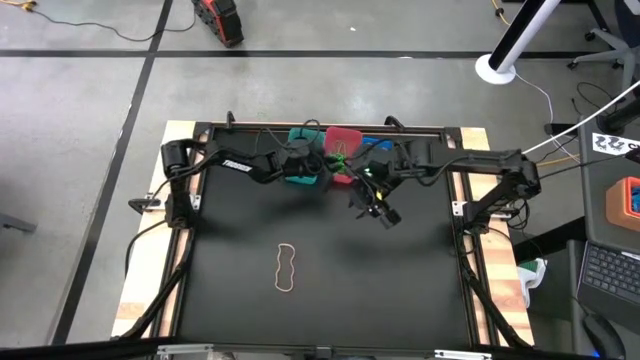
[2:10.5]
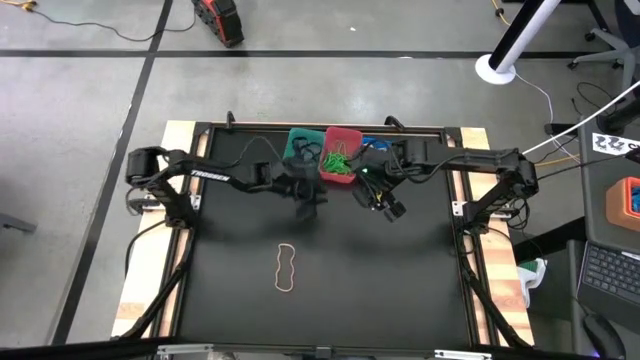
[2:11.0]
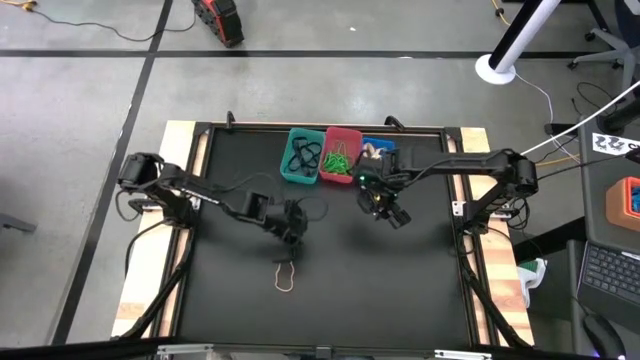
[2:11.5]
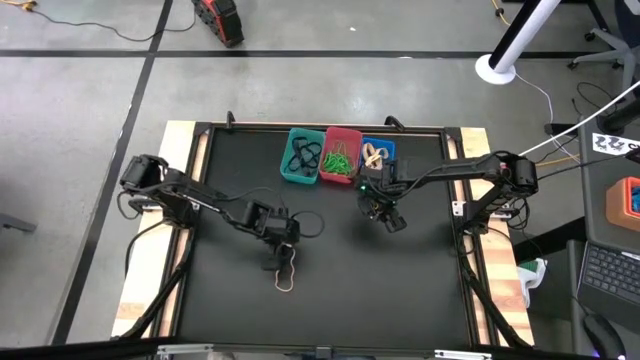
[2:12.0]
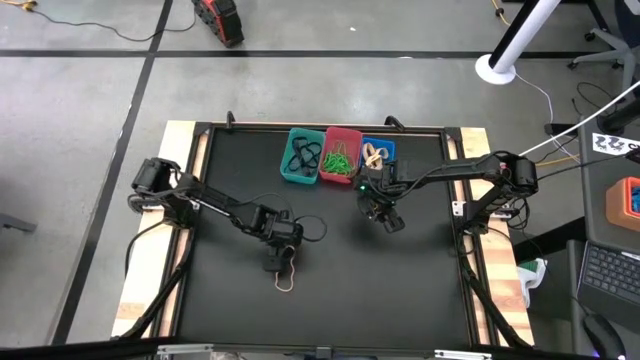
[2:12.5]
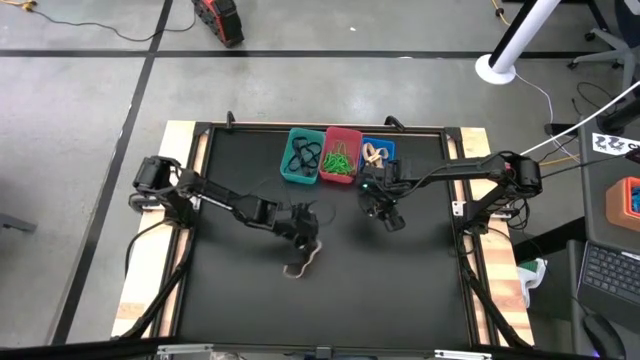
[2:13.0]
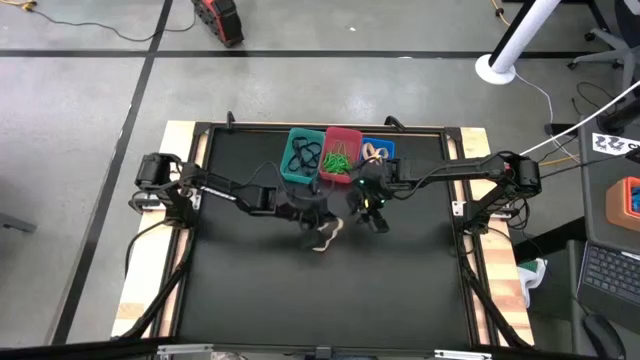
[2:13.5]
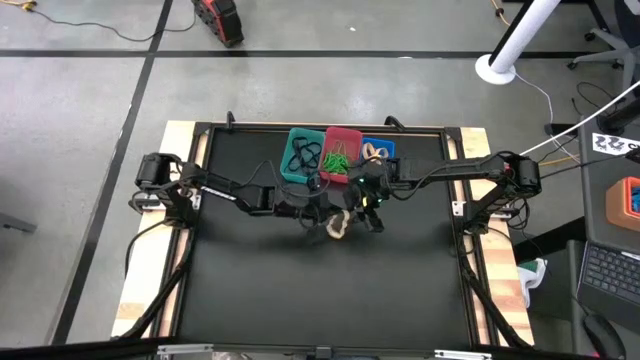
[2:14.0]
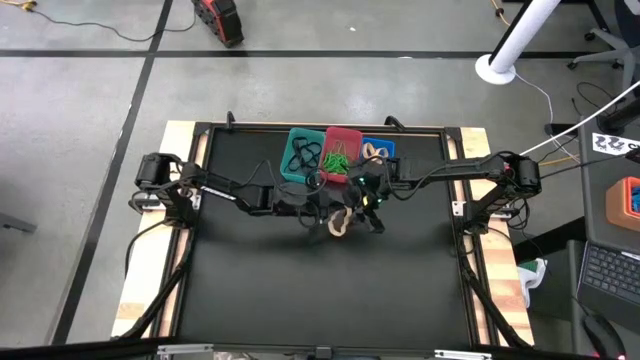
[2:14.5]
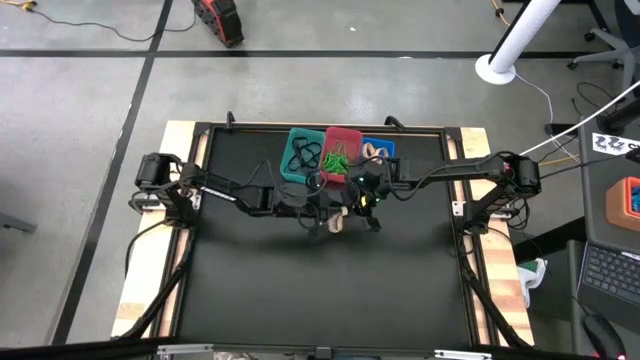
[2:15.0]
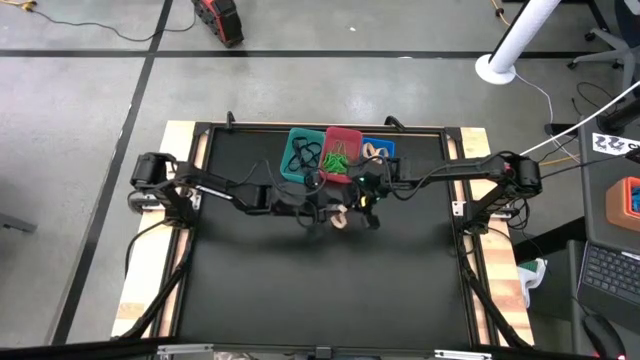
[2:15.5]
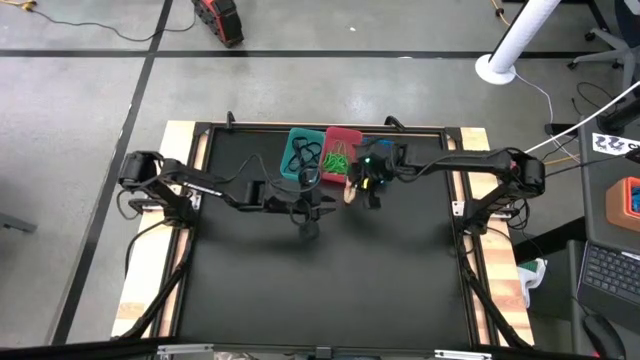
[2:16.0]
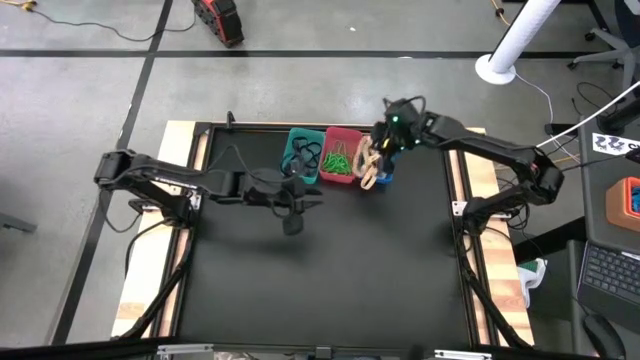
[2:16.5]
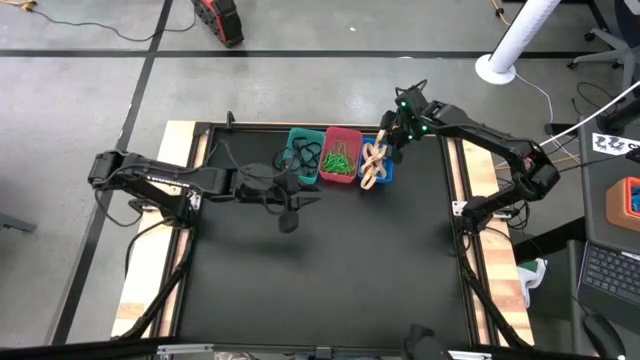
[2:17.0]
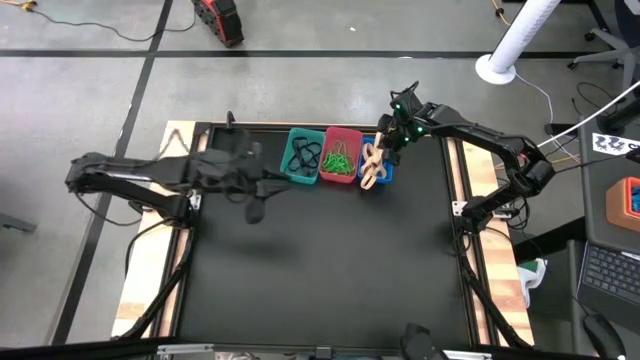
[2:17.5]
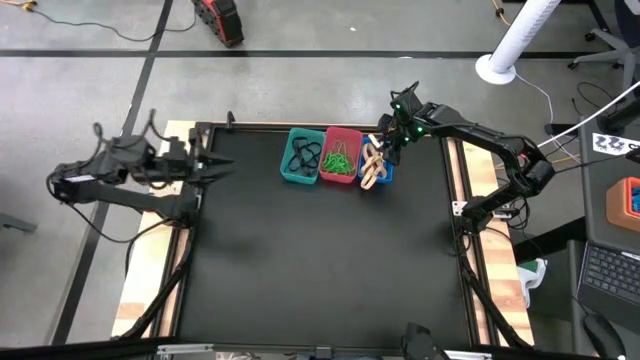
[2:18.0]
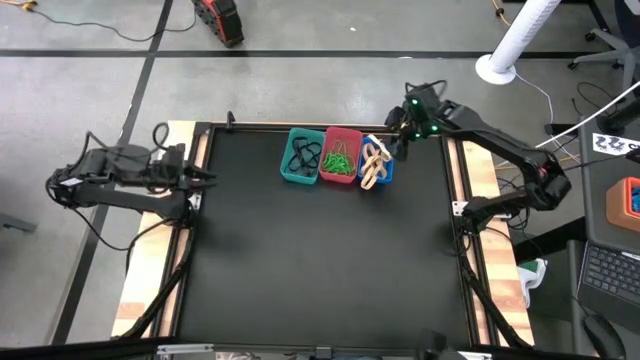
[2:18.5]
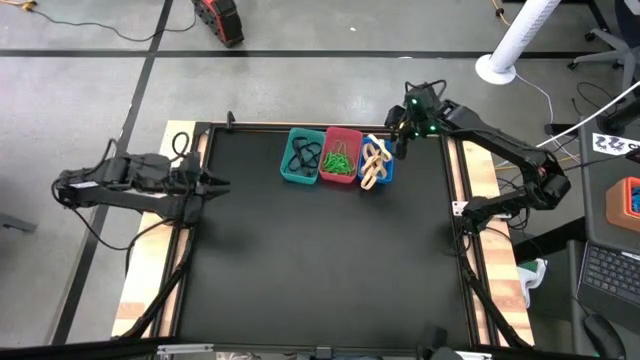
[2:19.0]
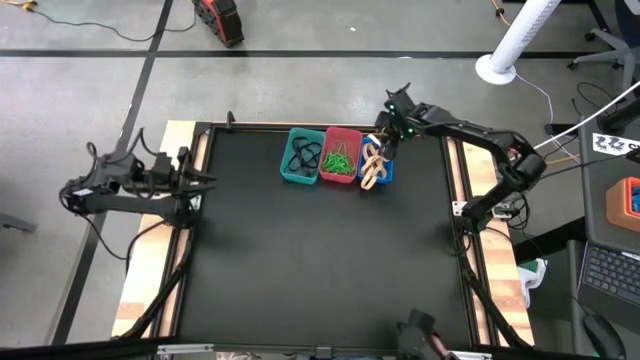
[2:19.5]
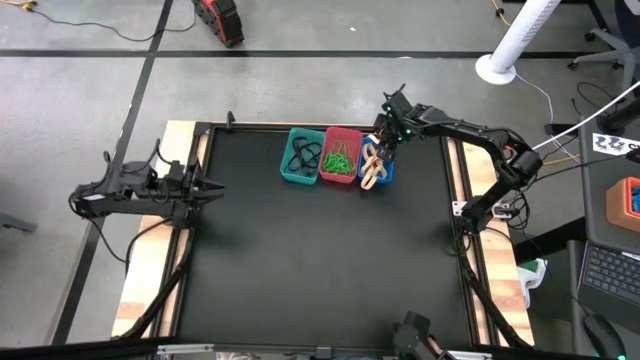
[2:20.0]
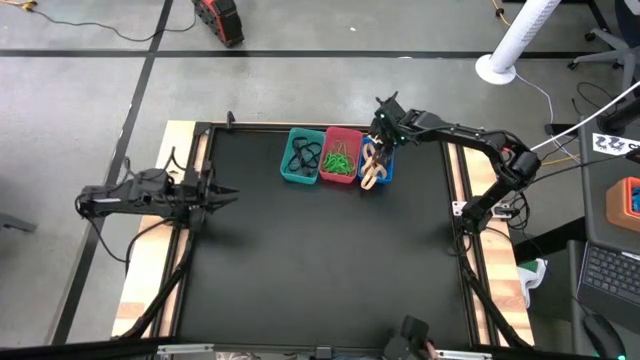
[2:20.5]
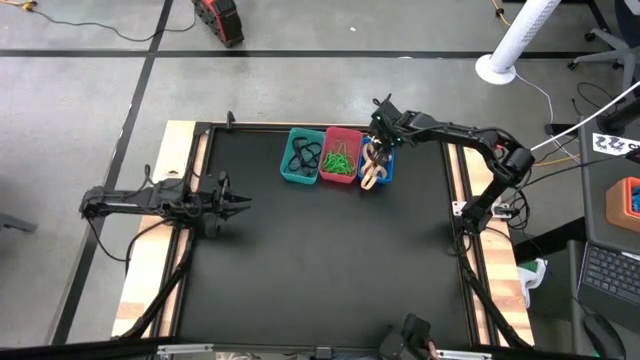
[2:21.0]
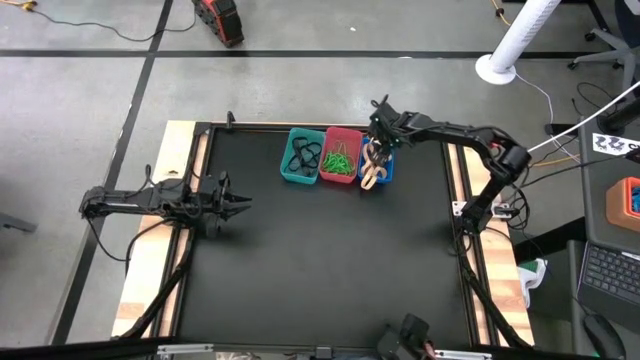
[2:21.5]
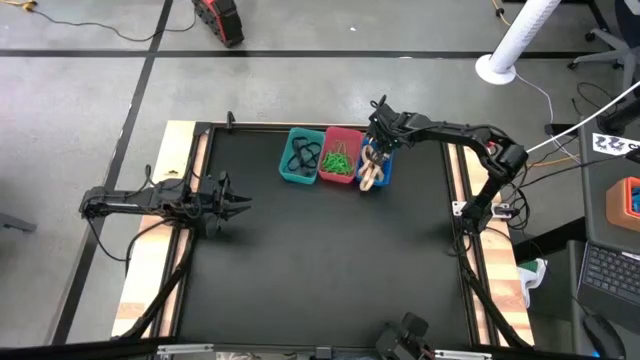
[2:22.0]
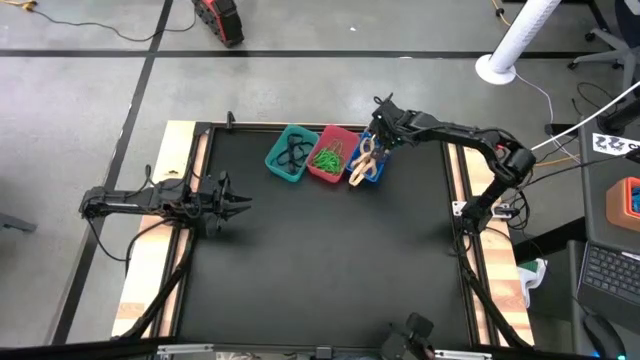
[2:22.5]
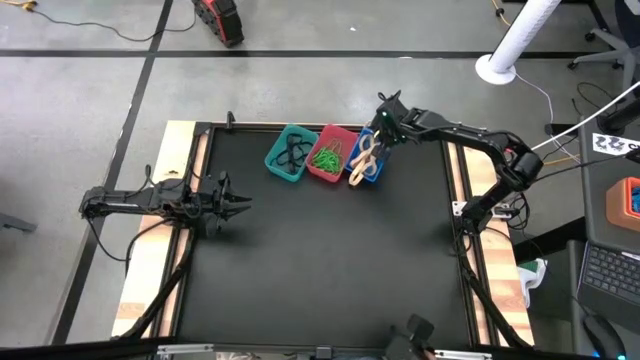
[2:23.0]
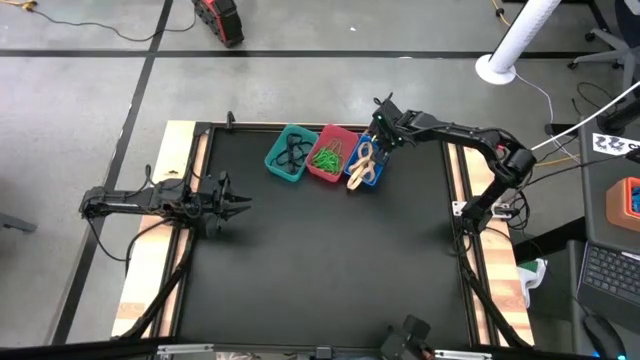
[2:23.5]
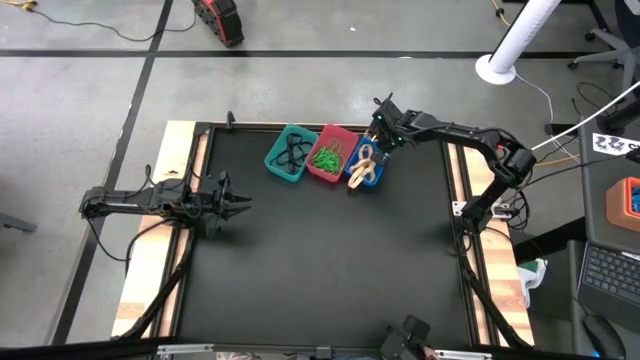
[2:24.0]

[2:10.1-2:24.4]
Task: Sort rubber bands into baskets
Put the brown rubber band into the blue bin

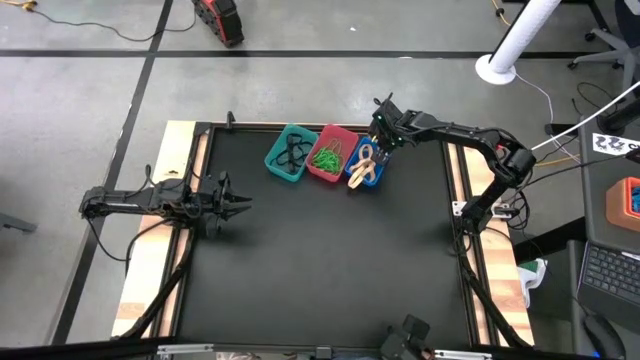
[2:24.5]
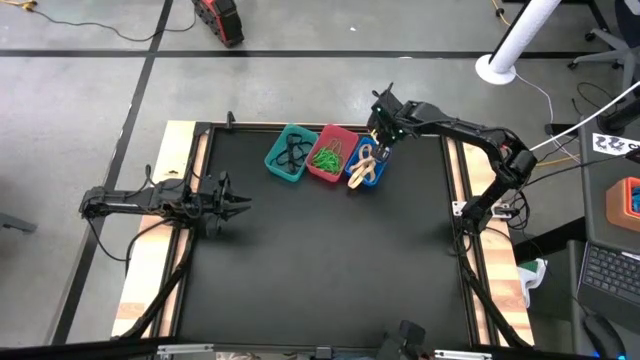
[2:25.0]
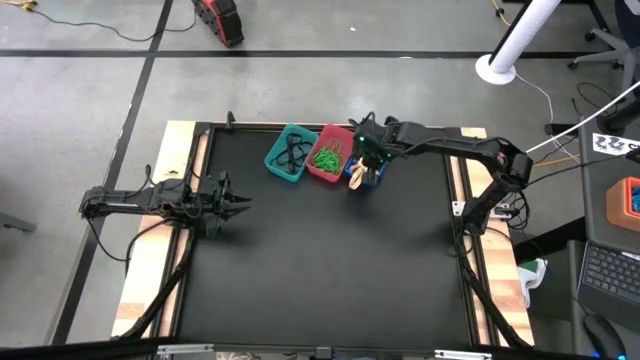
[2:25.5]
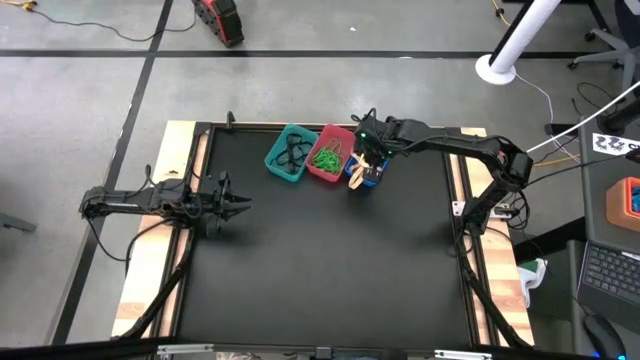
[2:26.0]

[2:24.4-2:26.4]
Put the brown rubber band into the blue bin

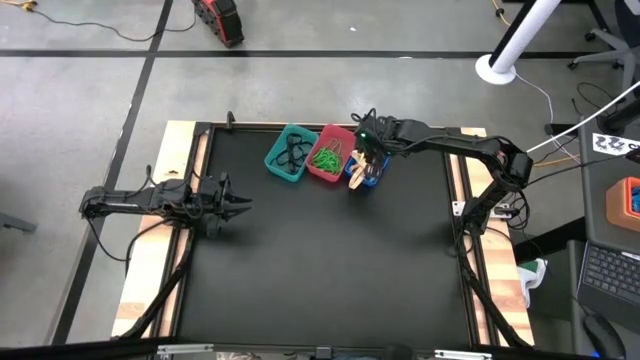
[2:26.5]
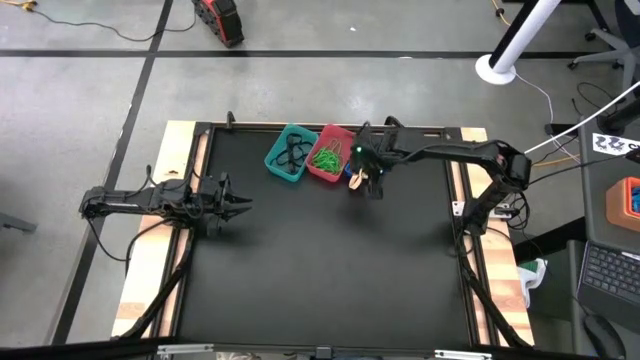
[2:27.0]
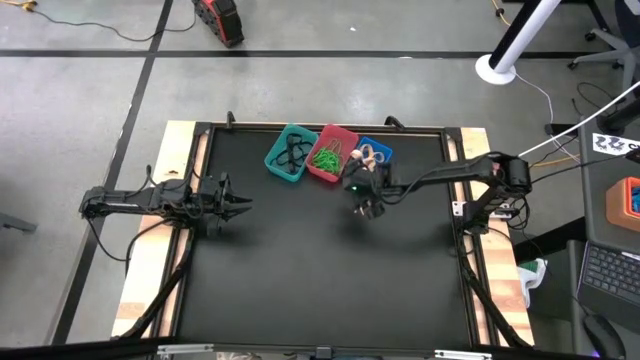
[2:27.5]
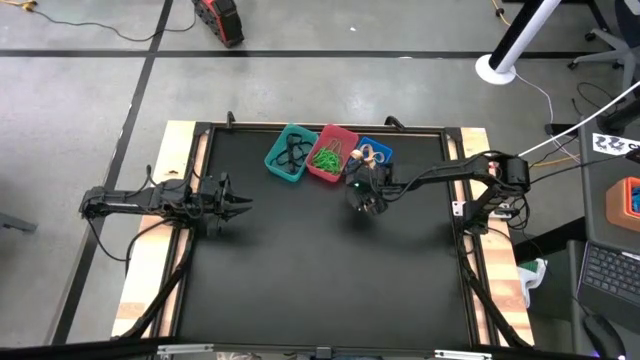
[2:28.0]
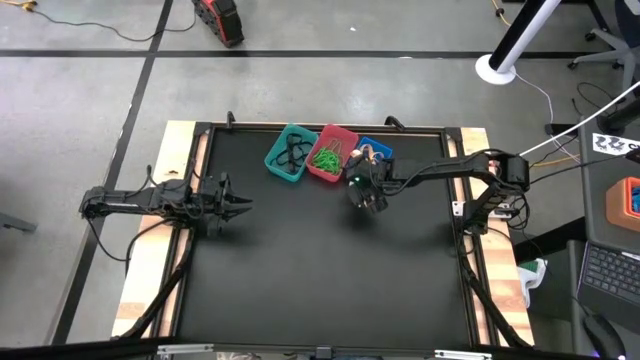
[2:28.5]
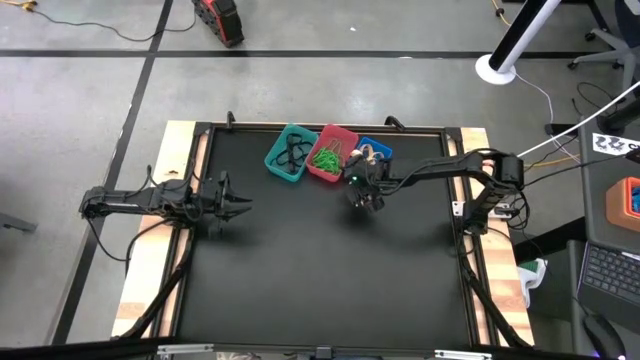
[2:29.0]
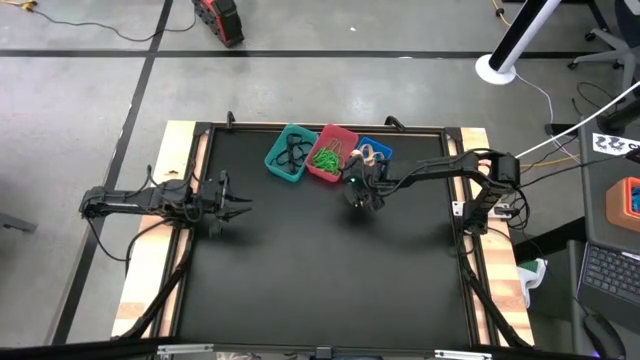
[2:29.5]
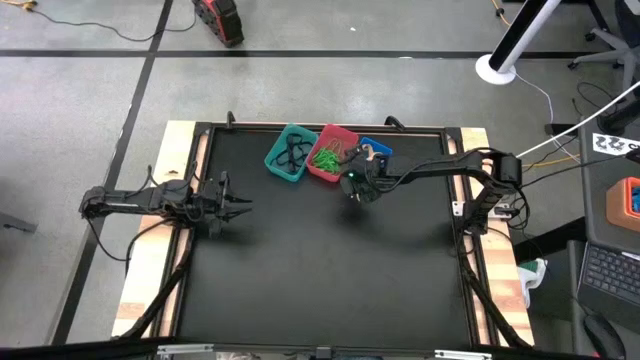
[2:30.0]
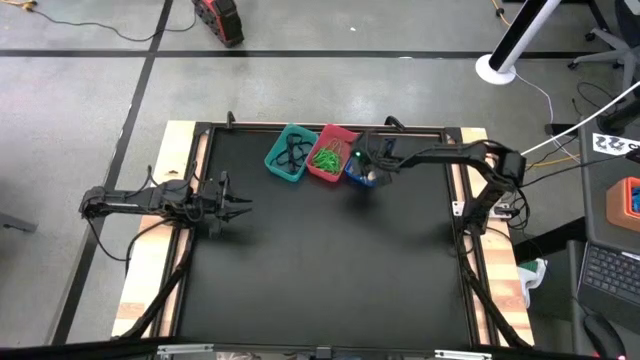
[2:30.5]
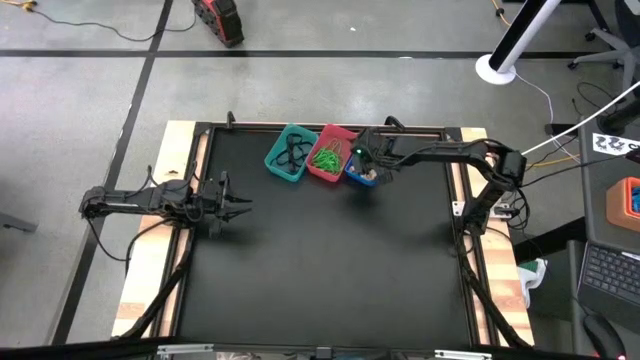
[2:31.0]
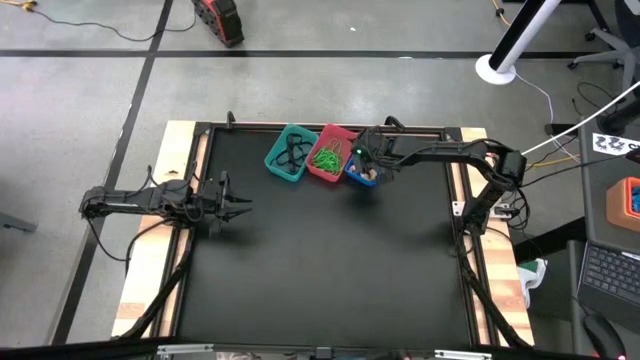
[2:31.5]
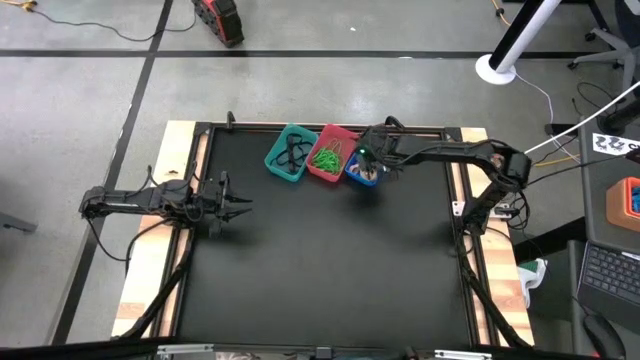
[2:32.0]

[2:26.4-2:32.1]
Adjust the brown rubber band
